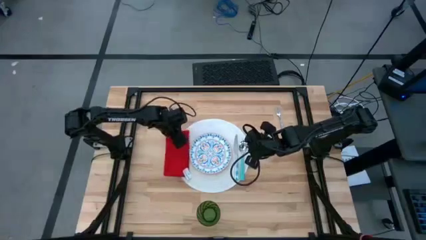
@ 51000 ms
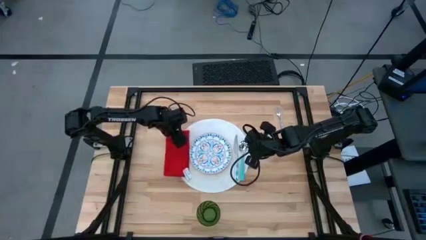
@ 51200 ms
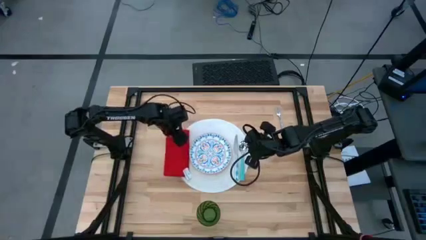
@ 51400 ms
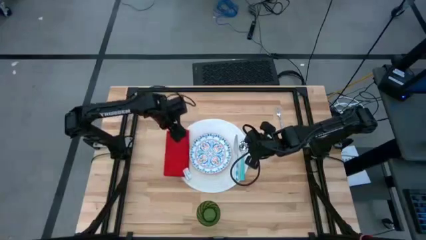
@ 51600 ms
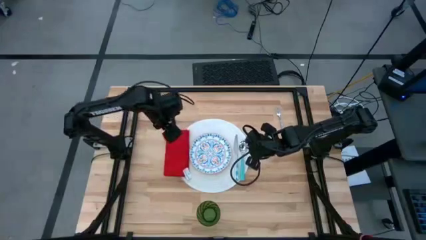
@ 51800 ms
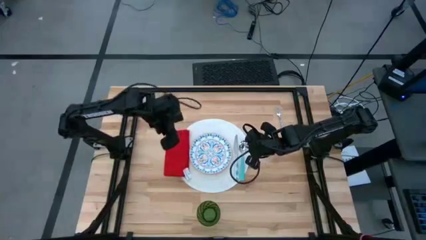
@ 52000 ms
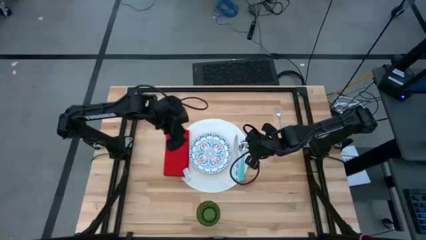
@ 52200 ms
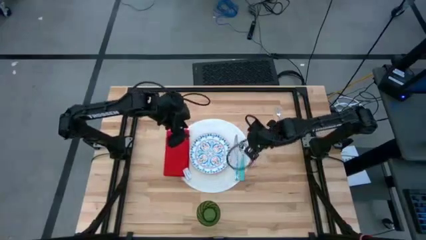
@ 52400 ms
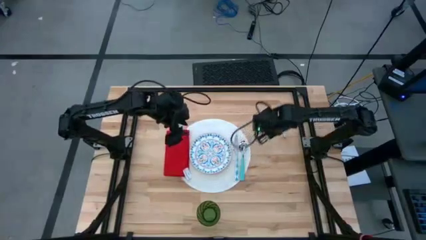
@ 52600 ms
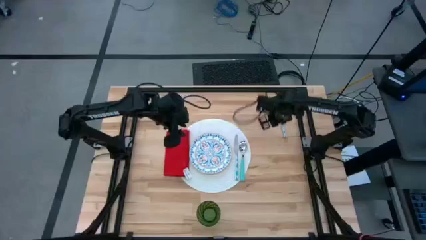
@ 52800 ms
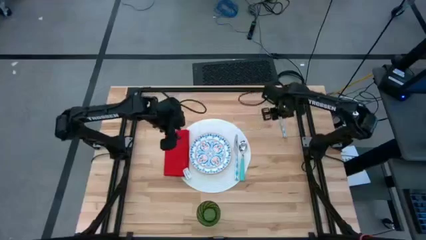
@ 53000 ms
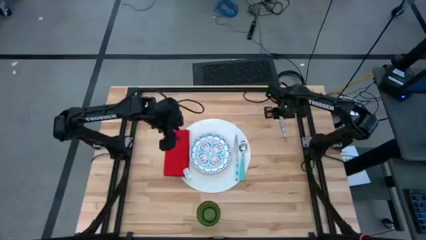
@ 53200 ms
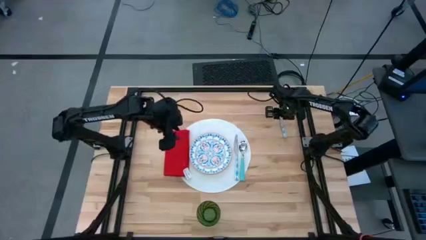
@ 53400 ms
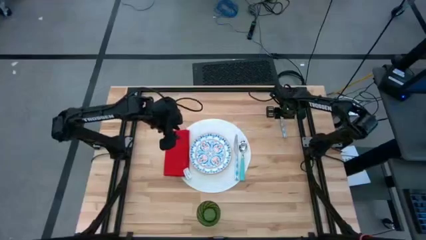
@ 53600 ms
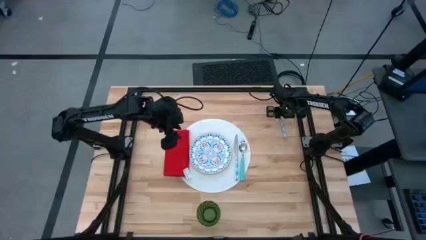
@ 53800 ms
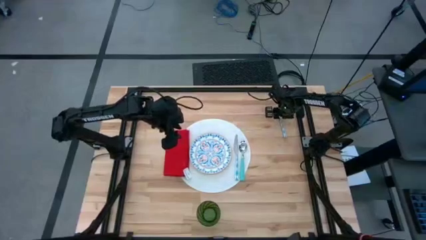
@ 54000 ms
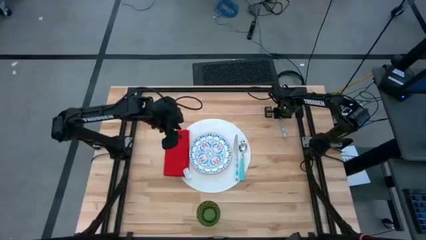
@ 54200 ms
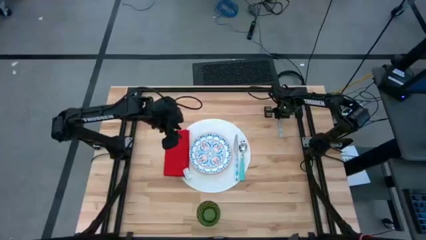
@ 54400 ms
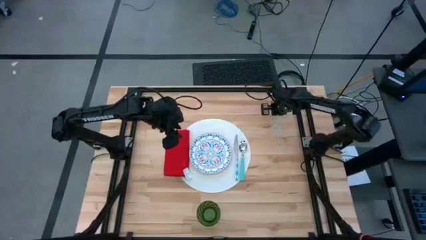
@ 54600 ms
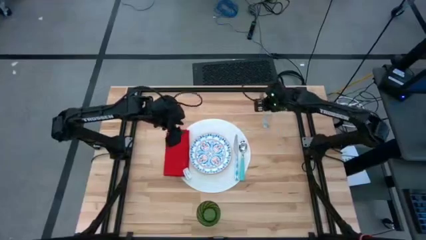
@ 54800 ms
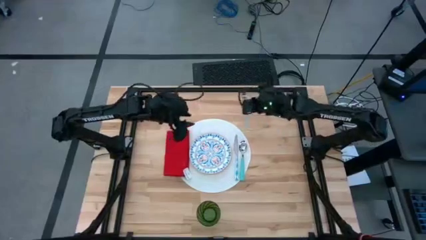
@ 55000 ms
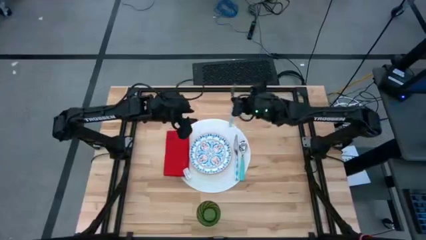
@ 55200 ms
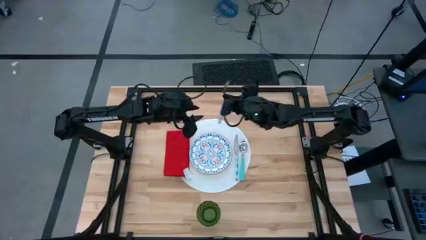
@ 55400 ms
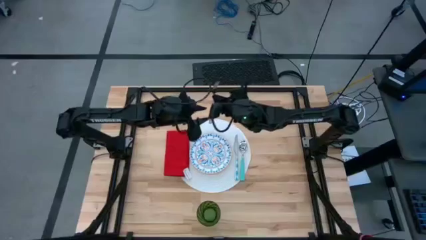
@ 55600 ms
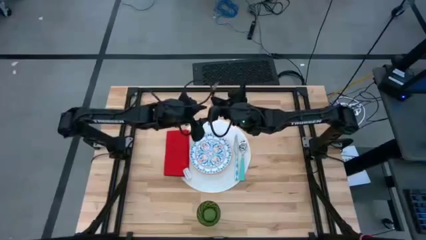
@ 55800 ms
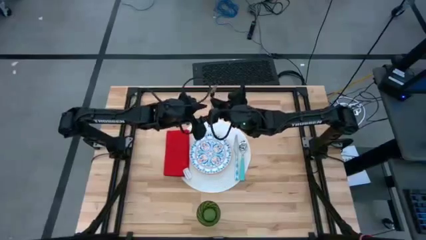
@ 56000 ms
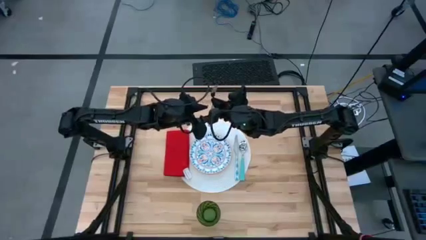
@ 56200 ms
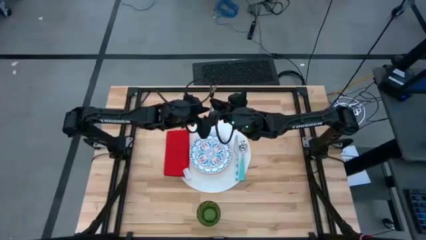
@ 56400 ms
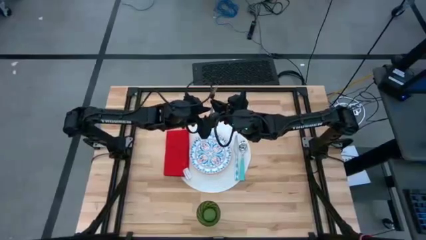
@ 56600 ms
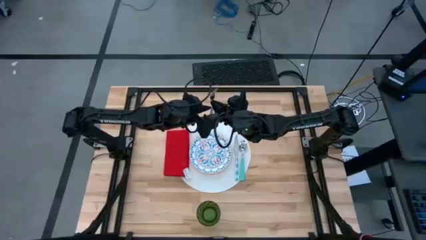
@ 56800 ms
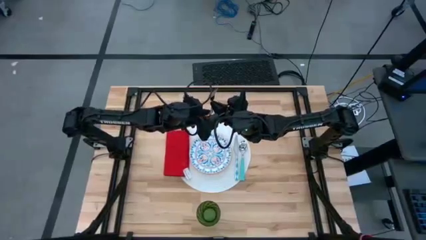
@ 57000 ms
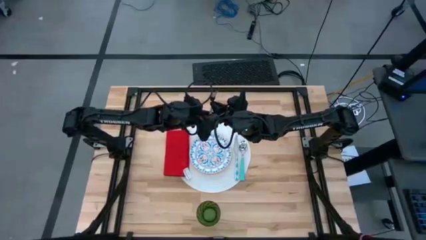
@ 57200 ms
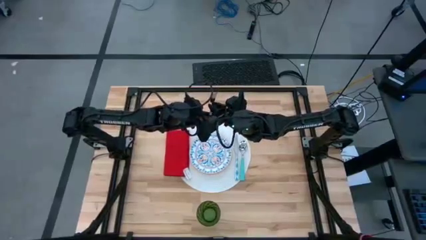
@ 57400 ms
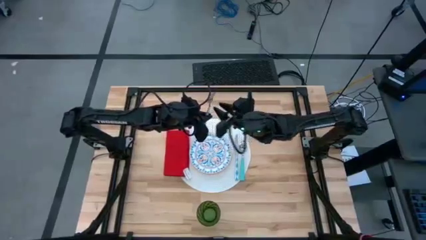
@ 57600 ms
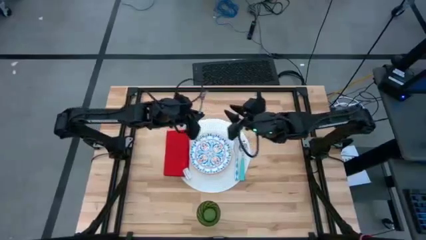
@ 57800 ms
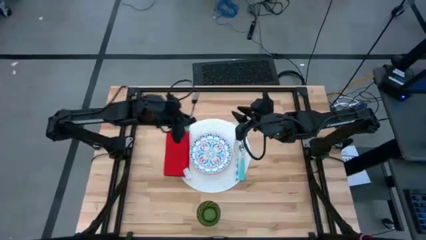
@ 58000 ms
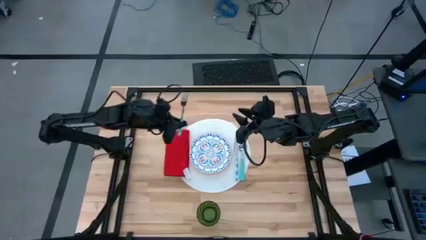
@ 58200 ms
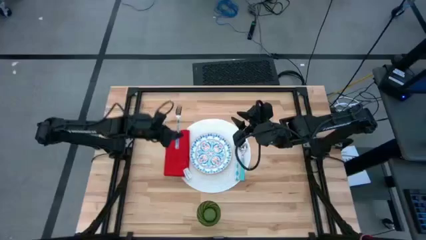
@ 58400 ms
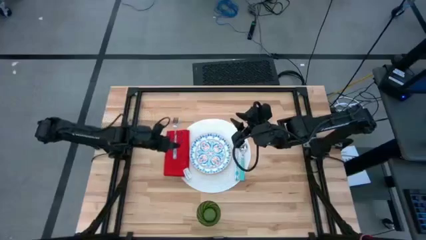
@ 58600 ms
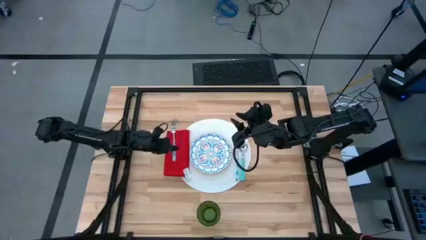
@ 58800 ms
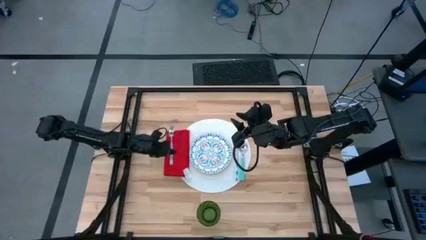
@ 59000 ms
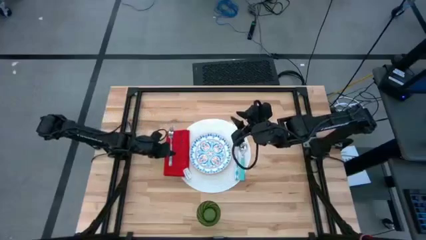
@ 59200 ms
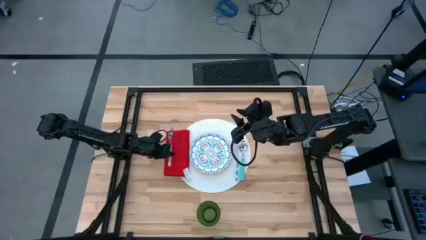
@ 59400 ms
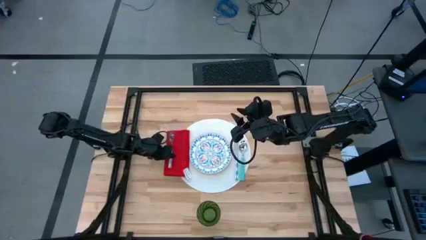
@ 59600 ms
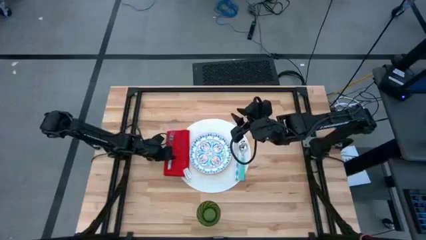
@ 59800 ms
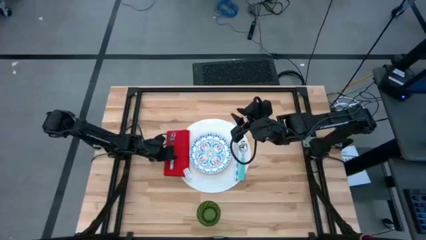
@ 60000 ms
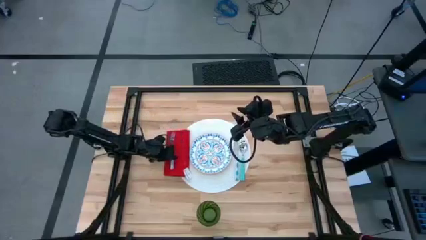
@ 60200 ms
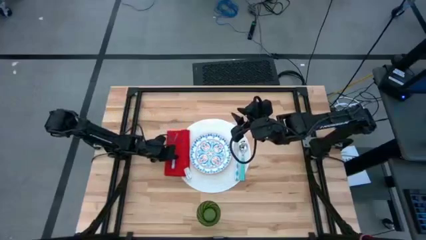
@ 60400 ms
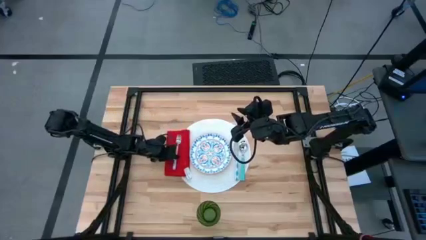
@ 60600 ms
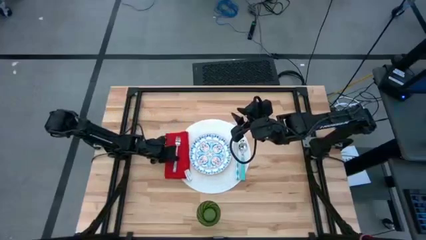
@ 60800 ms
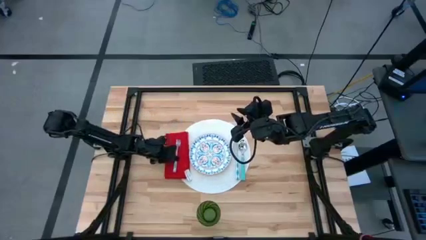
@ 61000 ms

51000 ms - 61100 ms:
Task: Set table place
Put the white fork on top of the red table napkin on the white tablemat
